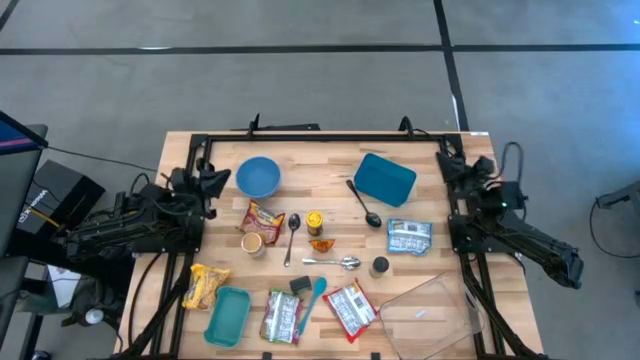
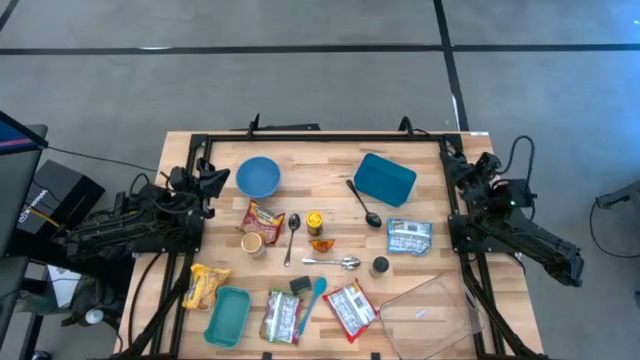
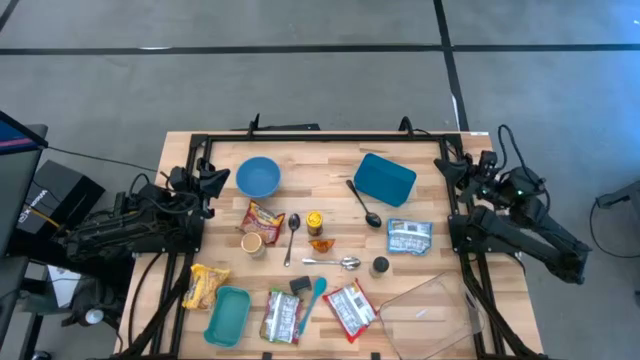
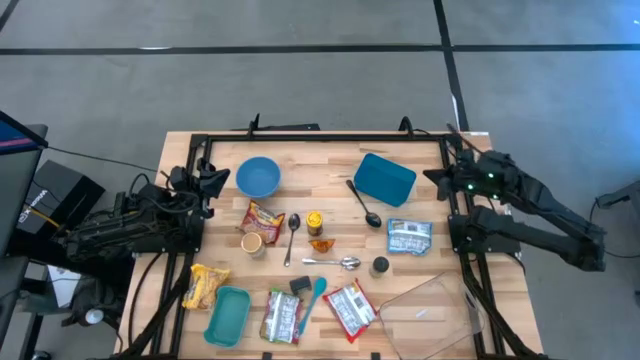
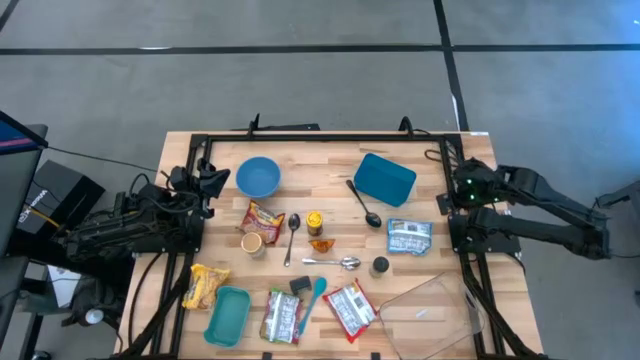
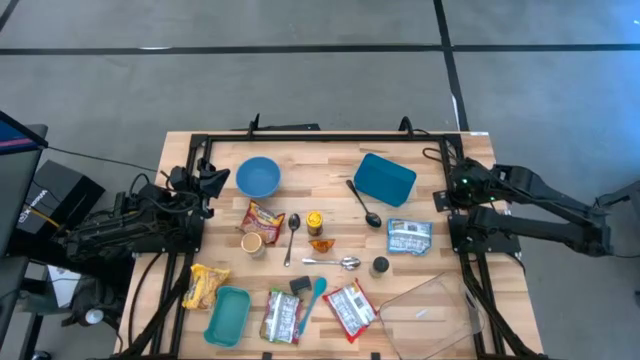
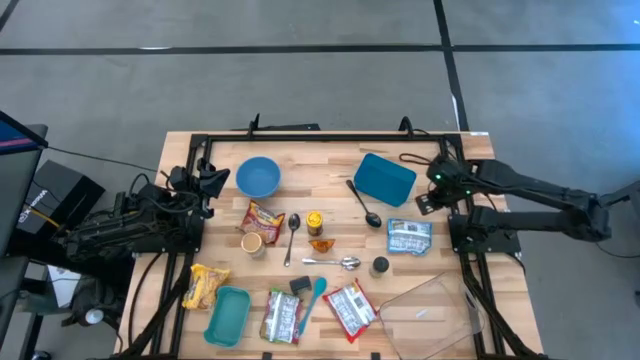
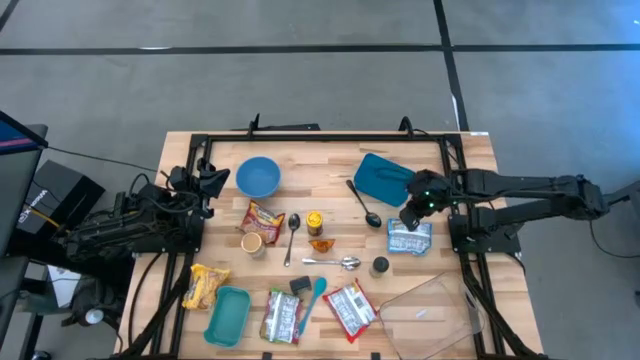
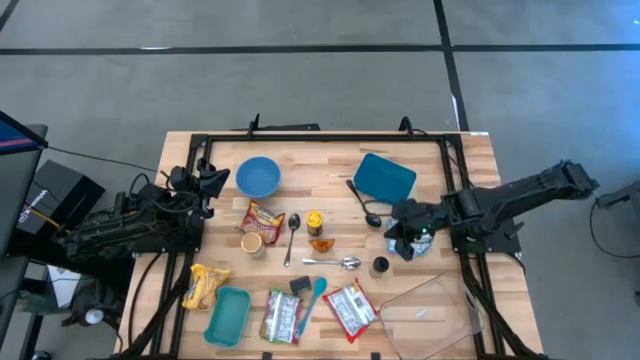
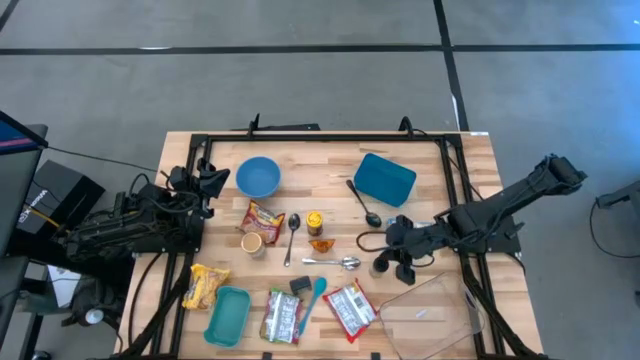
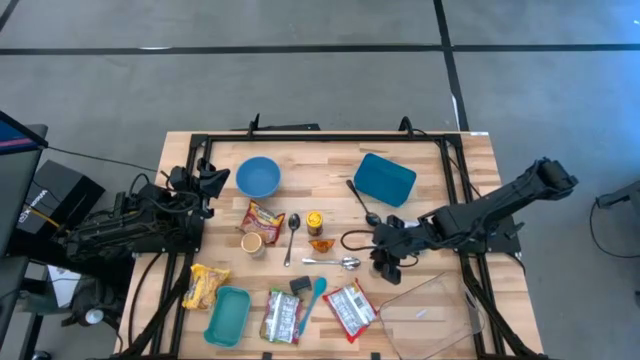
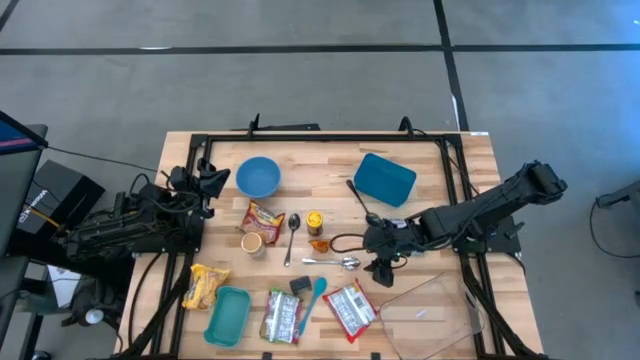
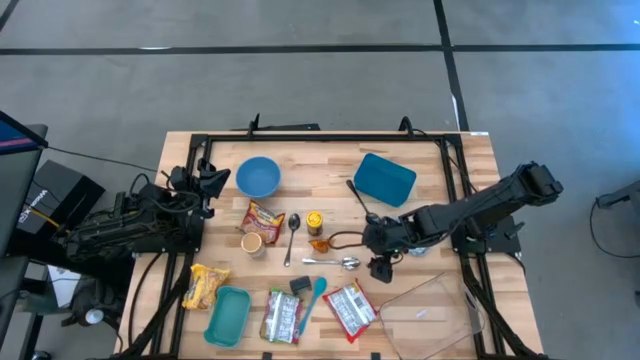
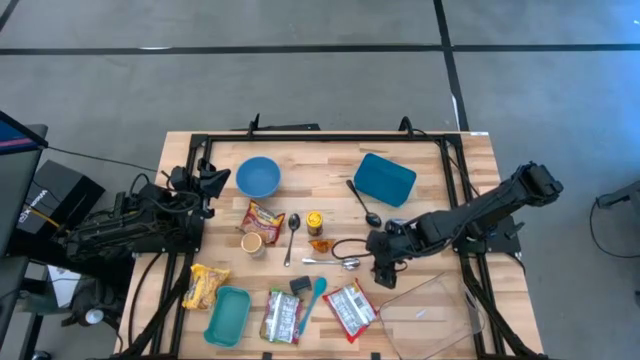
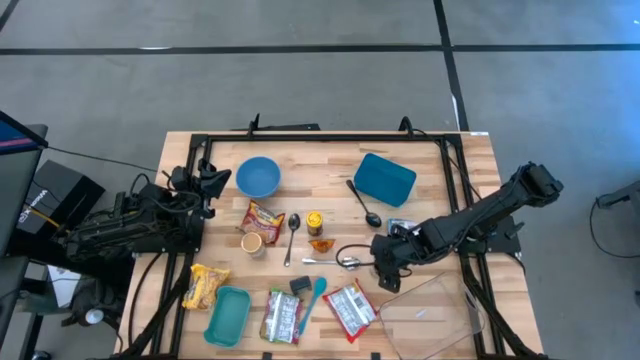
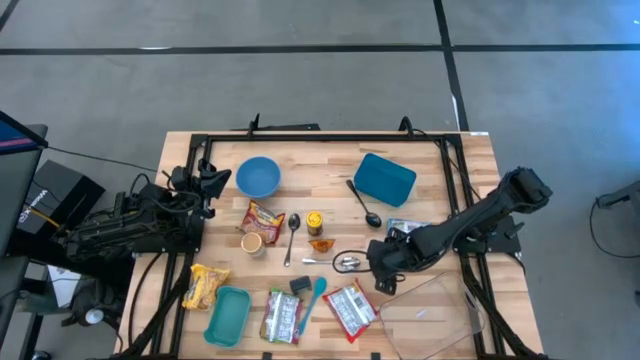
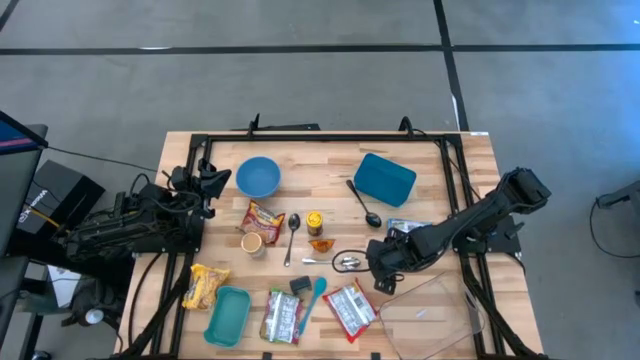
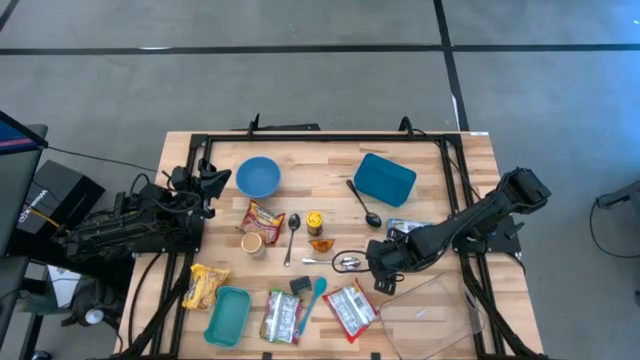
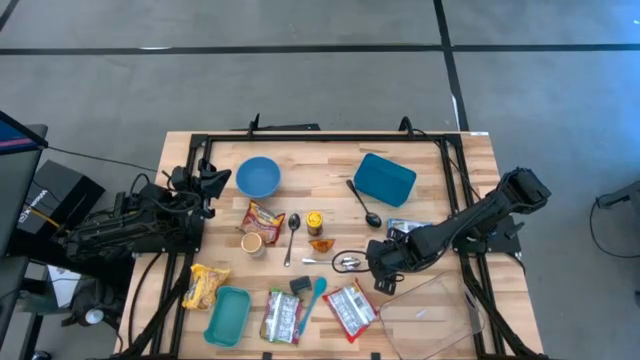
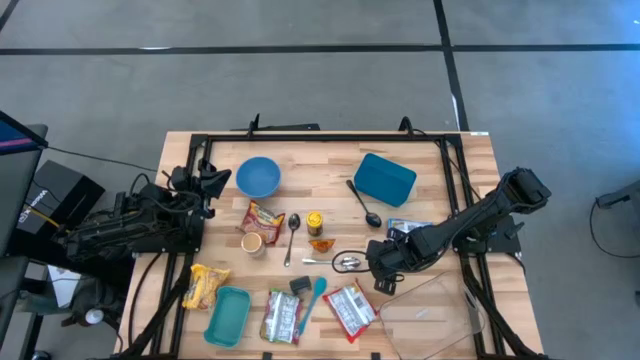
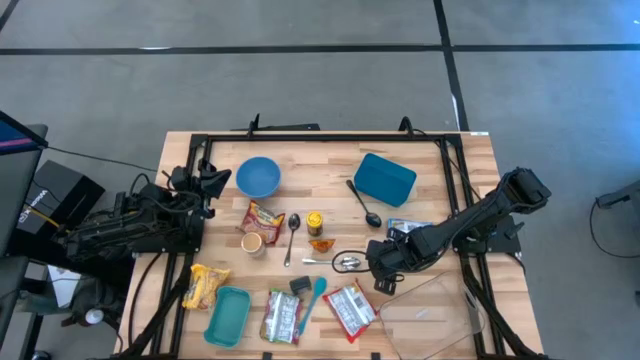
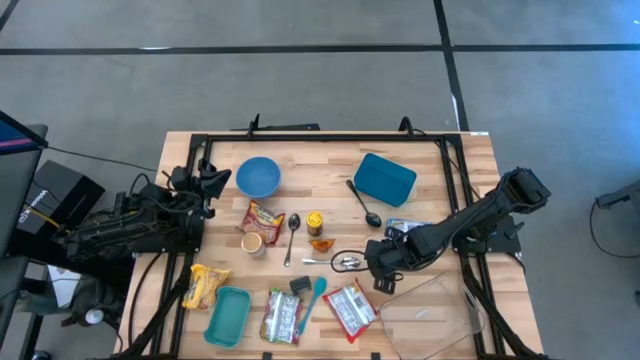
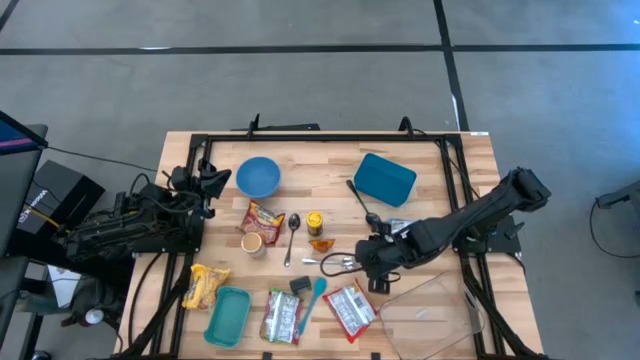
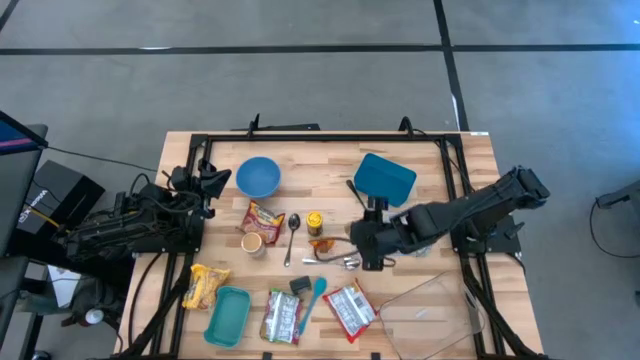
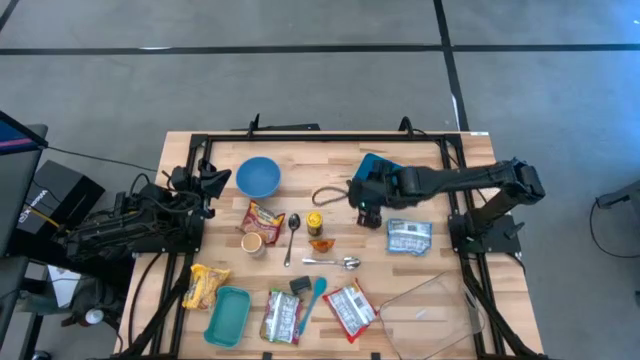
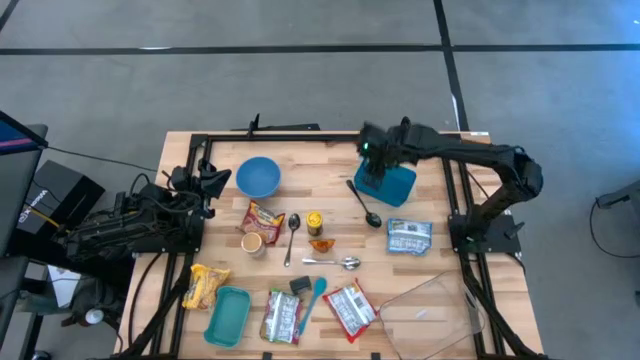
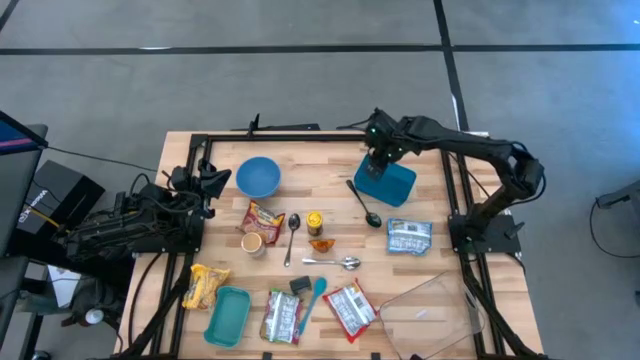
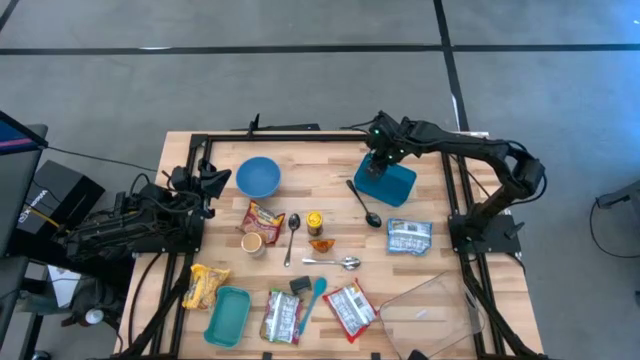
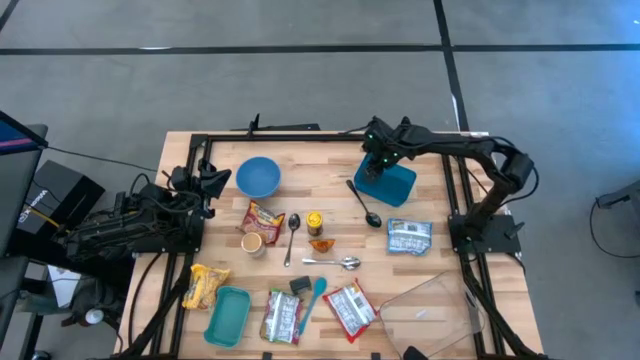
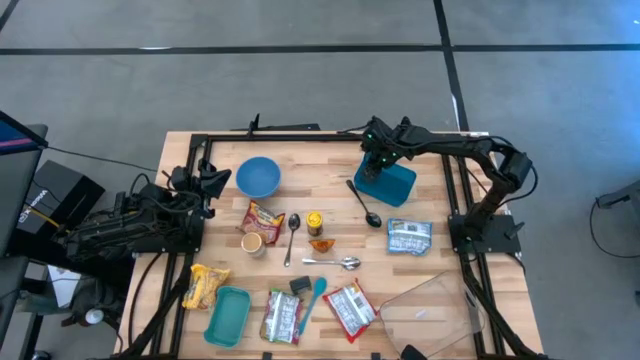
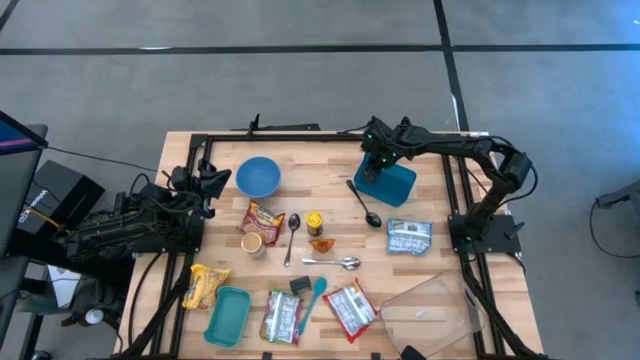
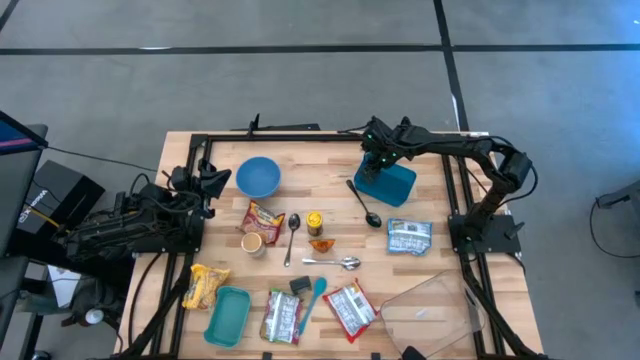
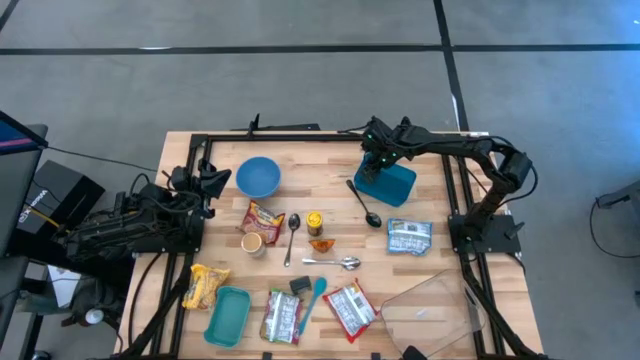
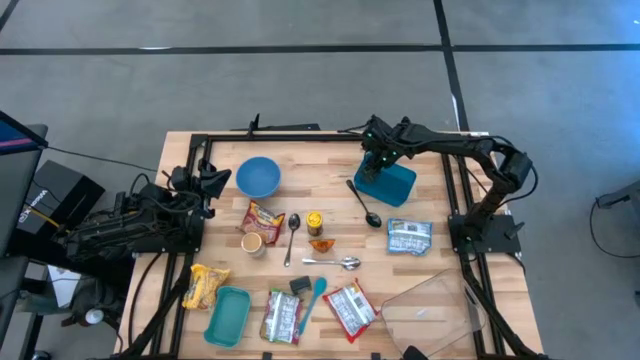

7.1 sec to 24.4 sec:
Task: Pick & Place Food Item
Put the light green seasoning bottle into the blue bin

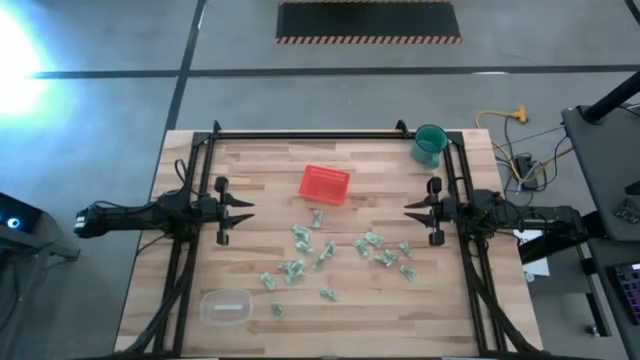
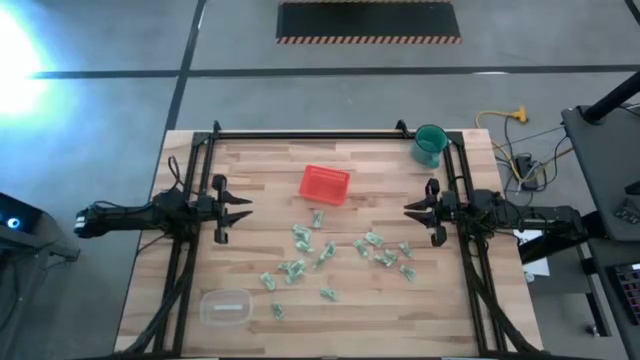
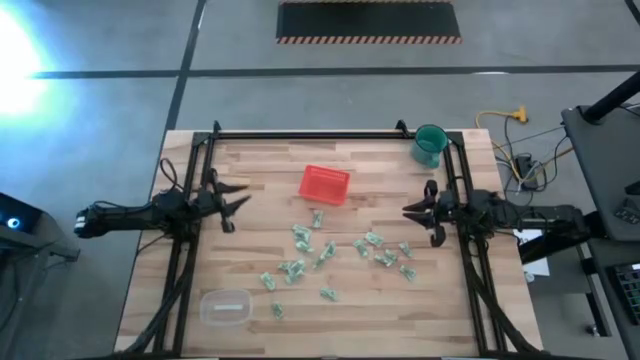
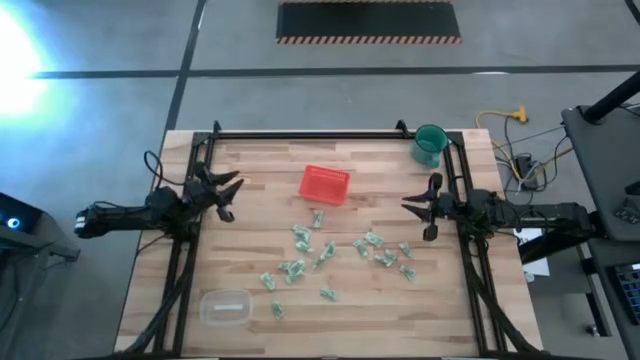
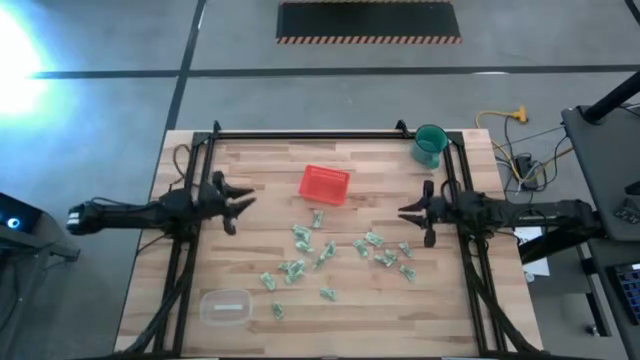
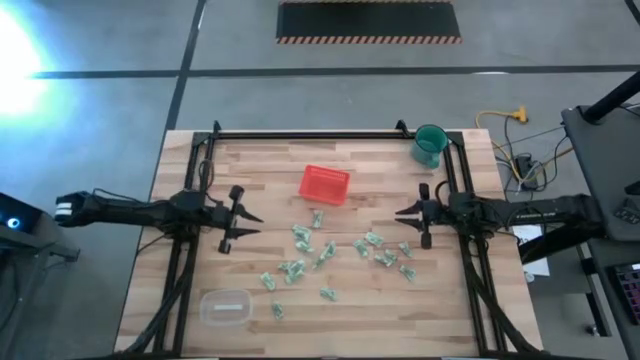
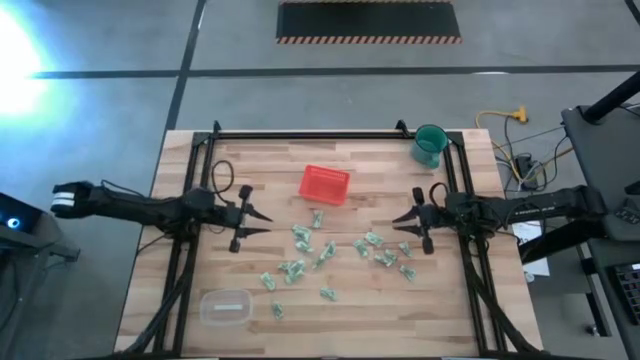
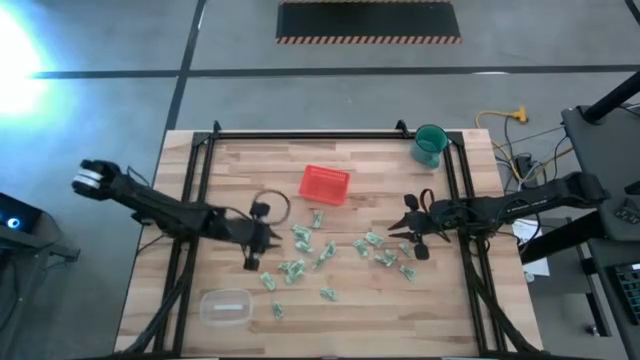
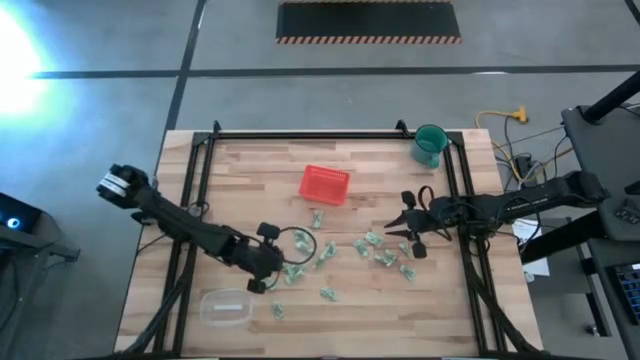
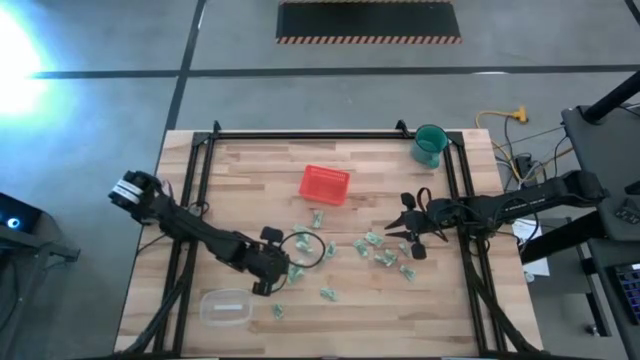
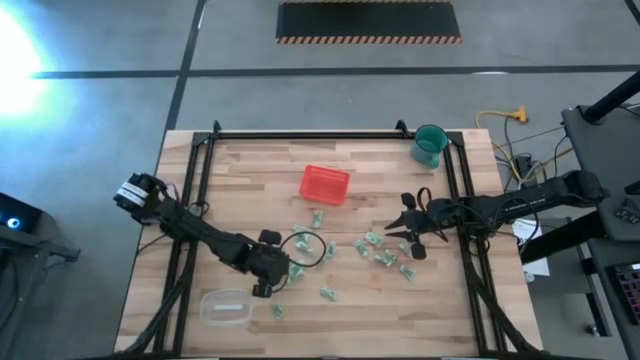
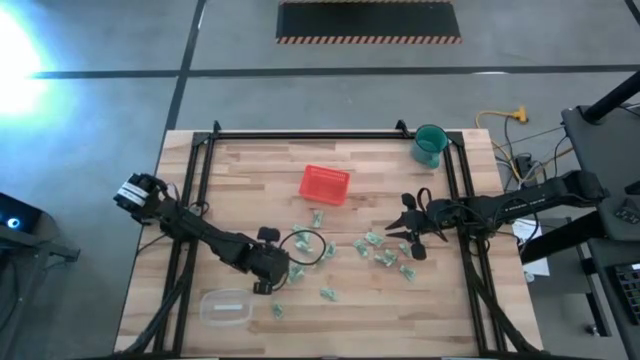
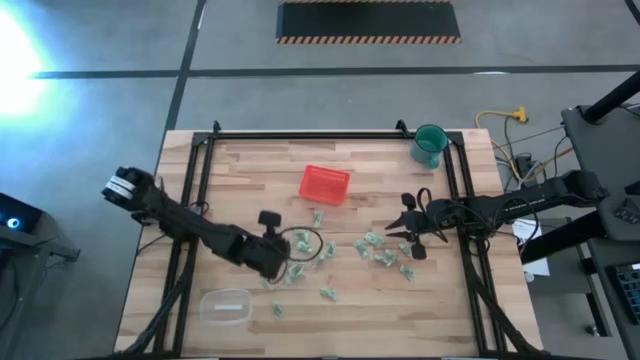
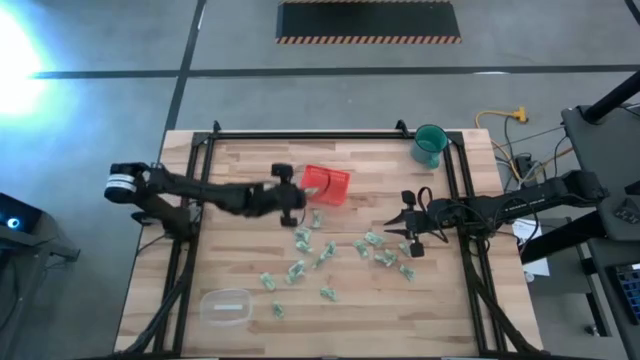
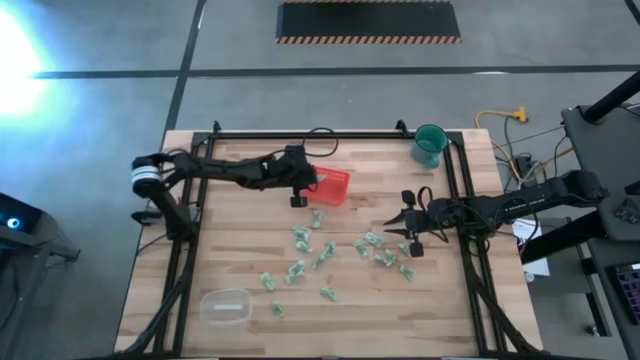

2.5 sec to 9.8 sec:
Task: Pick and place items into bin
Put the stevia packet into the orange bin
